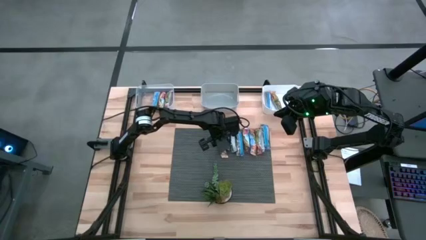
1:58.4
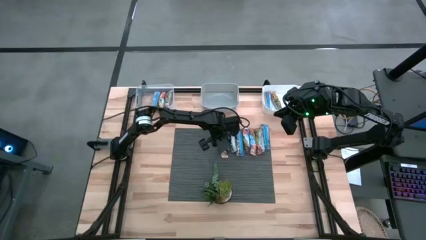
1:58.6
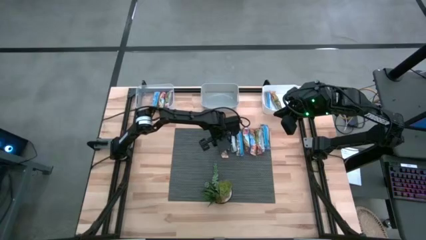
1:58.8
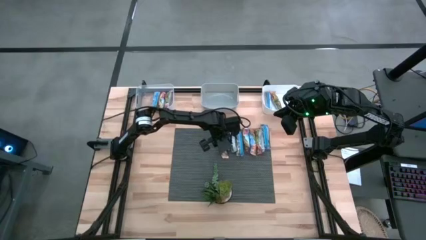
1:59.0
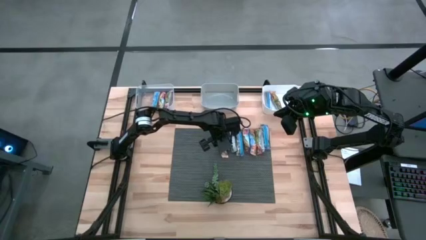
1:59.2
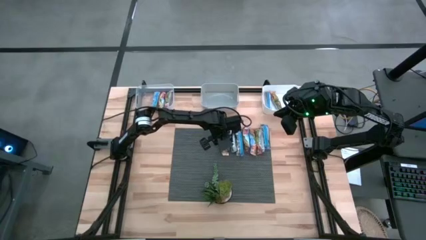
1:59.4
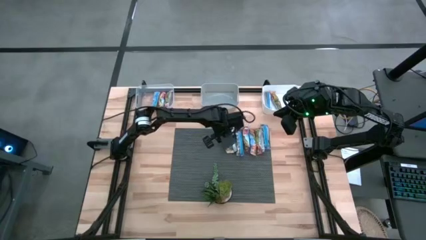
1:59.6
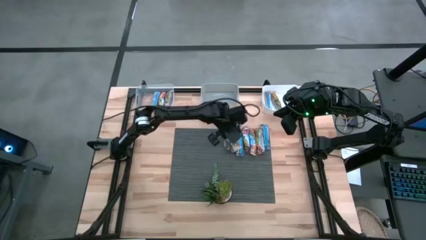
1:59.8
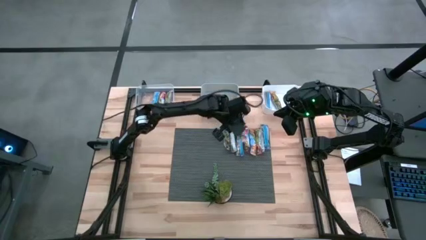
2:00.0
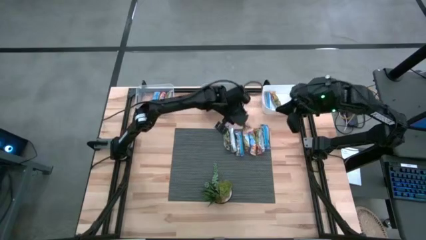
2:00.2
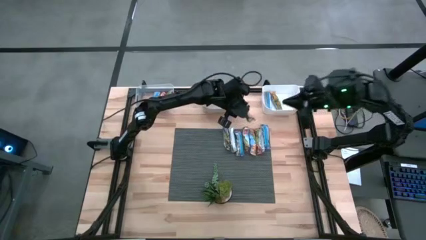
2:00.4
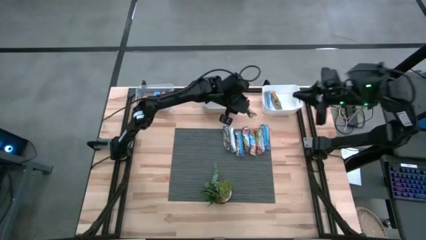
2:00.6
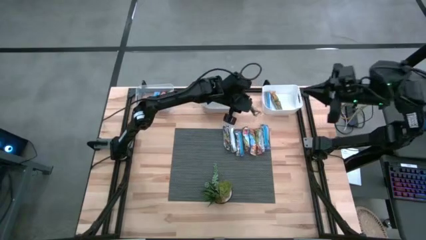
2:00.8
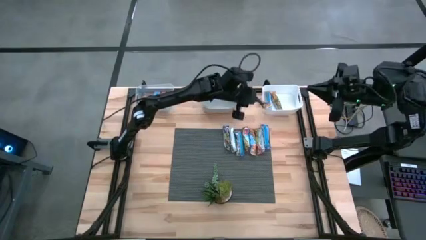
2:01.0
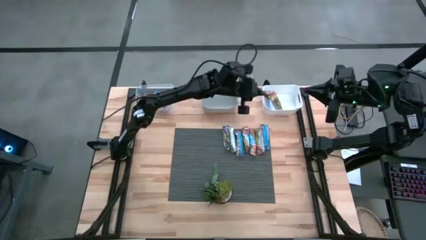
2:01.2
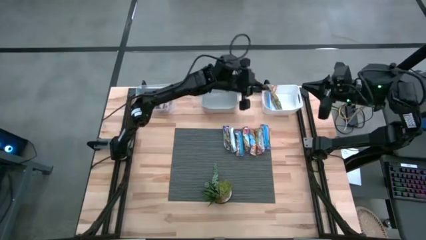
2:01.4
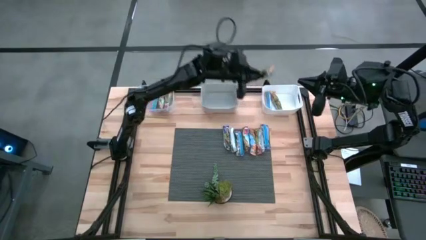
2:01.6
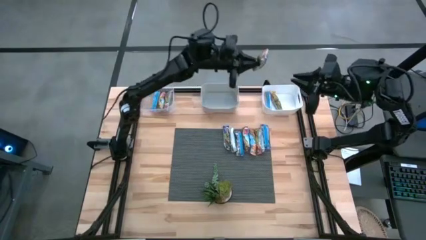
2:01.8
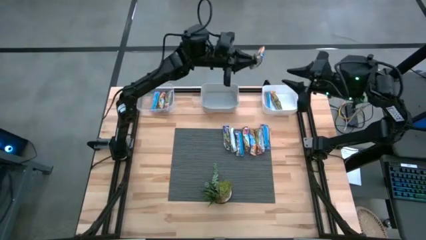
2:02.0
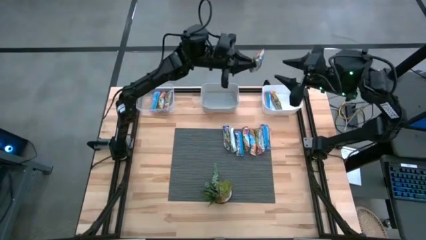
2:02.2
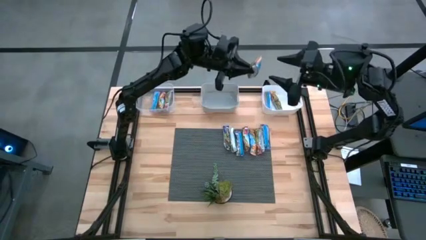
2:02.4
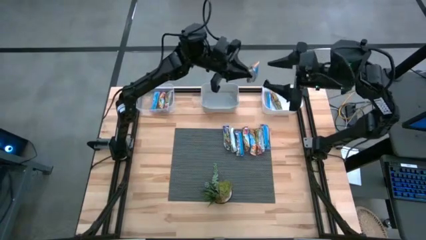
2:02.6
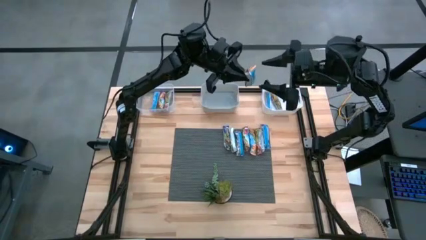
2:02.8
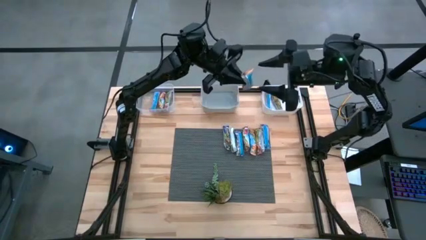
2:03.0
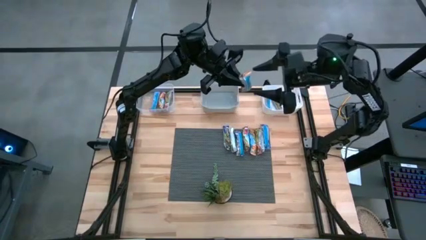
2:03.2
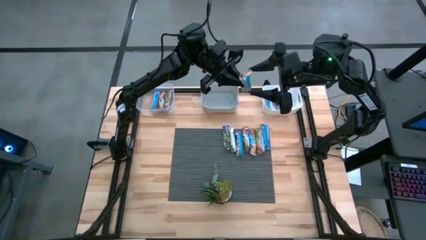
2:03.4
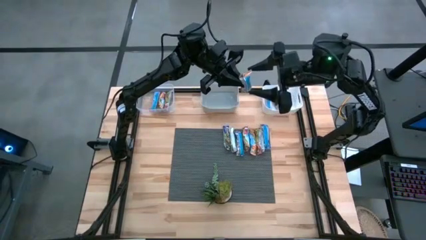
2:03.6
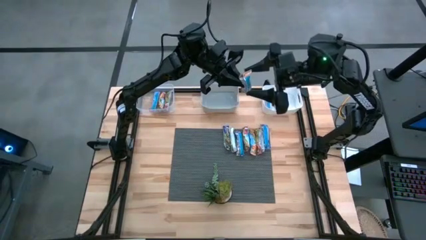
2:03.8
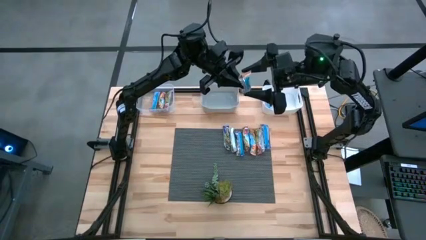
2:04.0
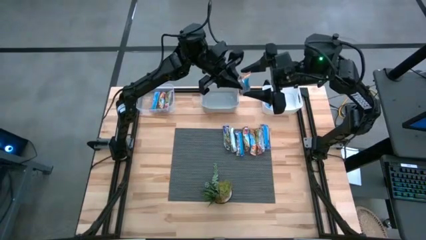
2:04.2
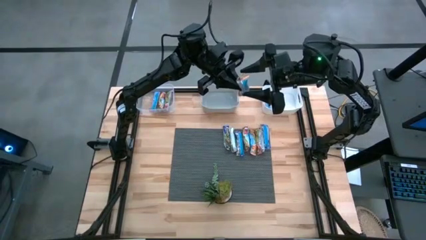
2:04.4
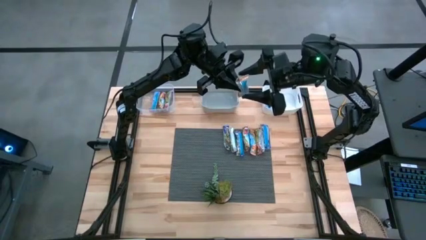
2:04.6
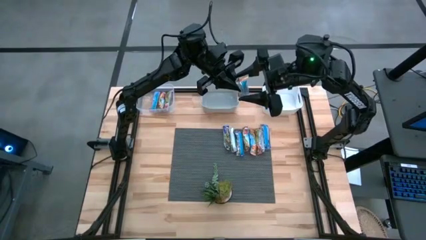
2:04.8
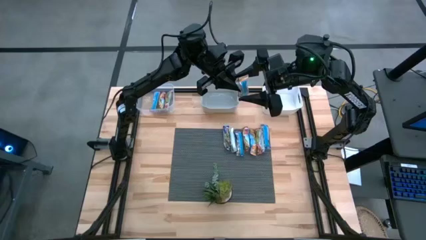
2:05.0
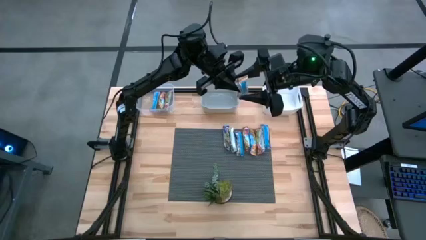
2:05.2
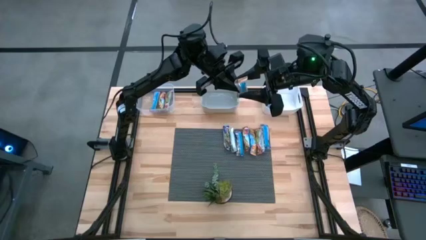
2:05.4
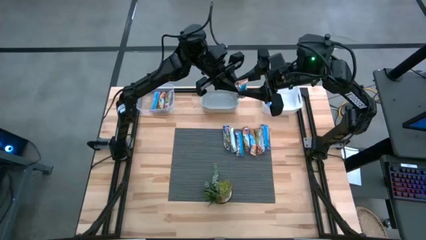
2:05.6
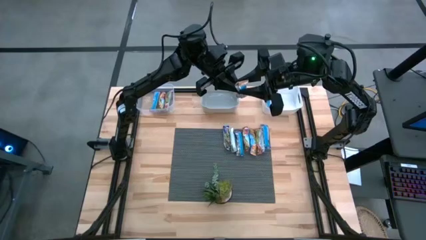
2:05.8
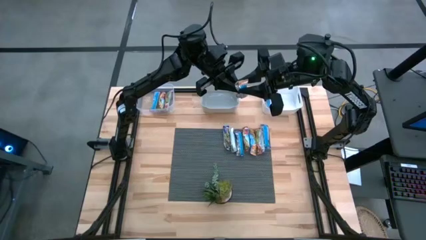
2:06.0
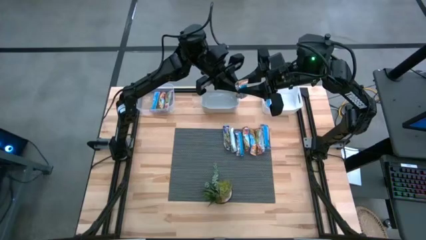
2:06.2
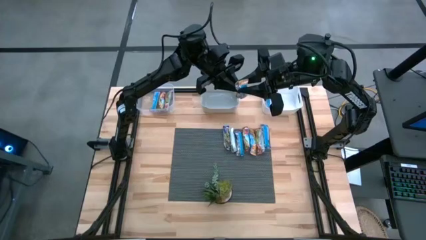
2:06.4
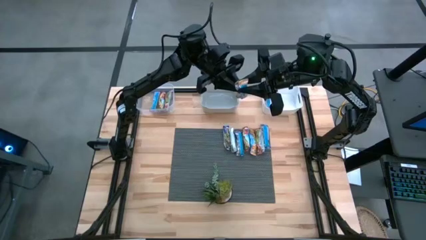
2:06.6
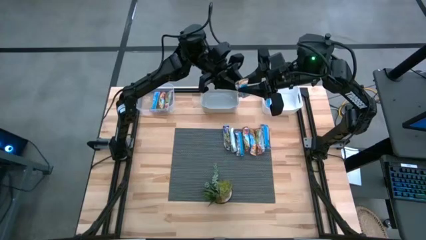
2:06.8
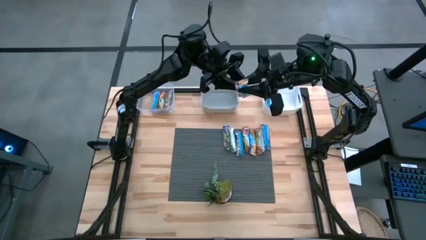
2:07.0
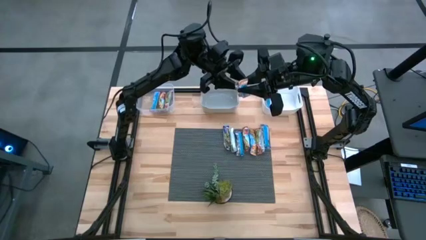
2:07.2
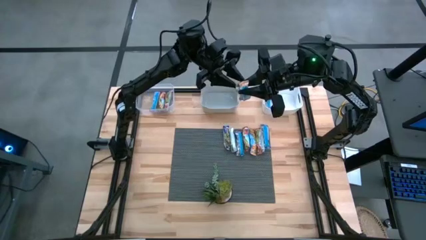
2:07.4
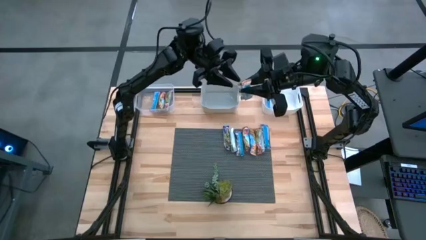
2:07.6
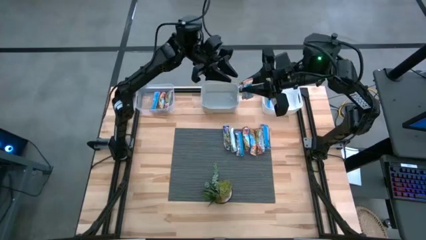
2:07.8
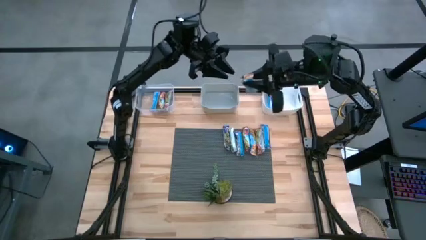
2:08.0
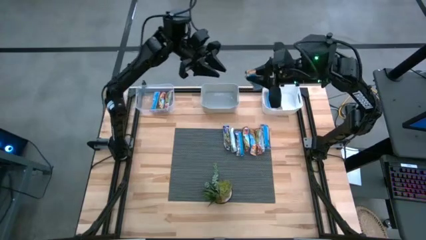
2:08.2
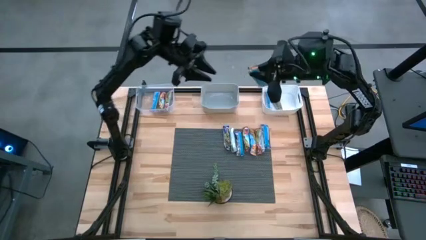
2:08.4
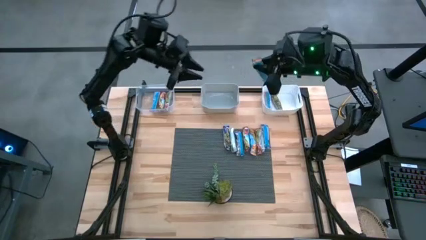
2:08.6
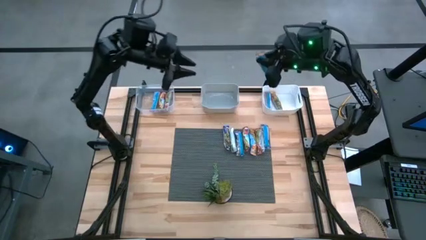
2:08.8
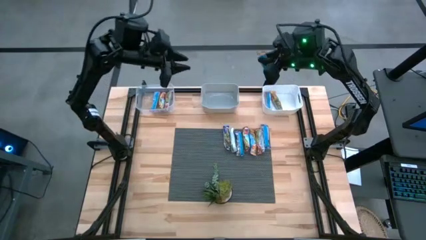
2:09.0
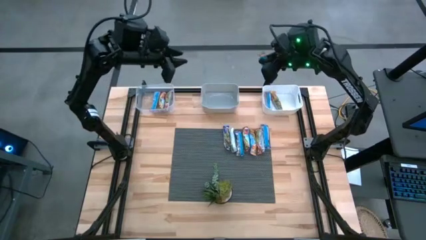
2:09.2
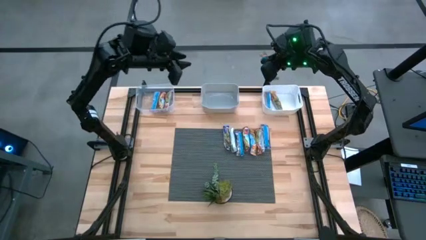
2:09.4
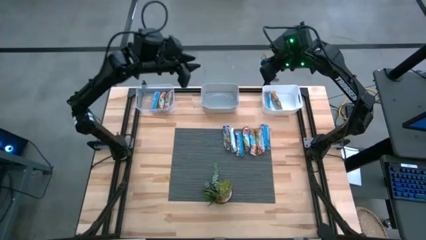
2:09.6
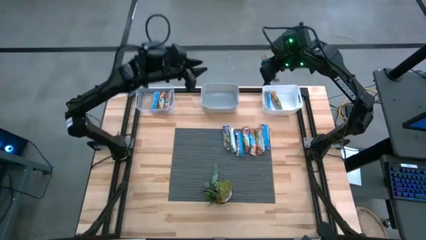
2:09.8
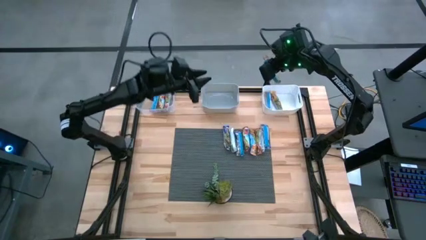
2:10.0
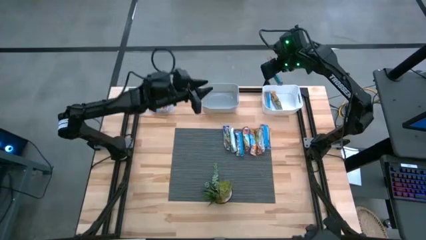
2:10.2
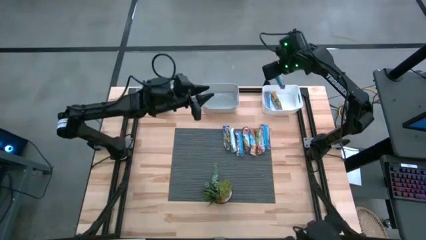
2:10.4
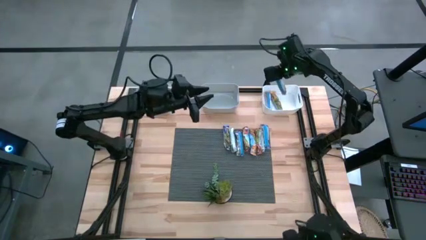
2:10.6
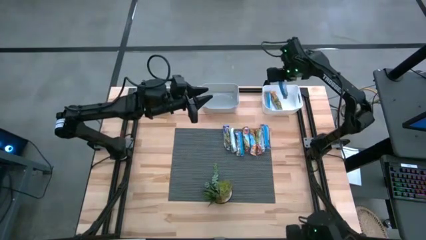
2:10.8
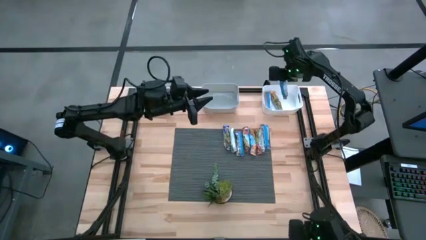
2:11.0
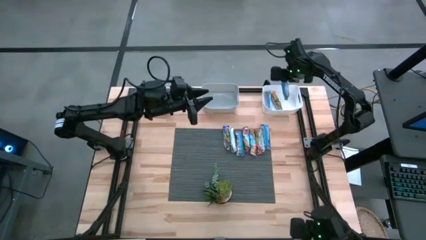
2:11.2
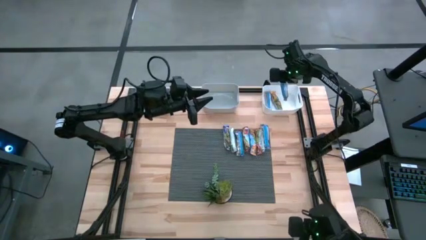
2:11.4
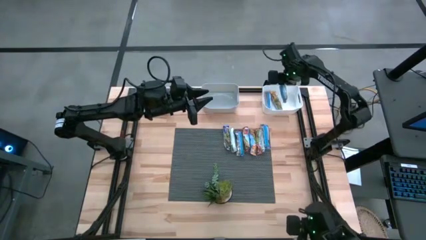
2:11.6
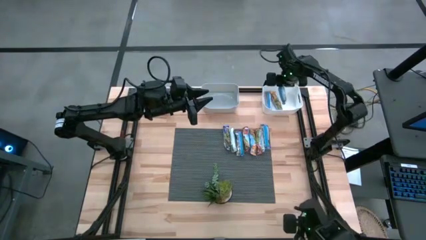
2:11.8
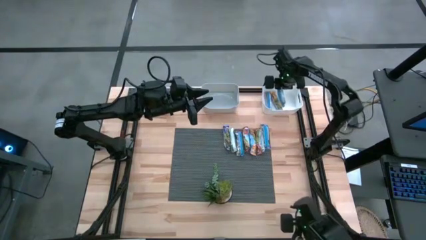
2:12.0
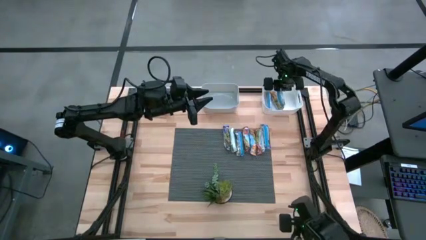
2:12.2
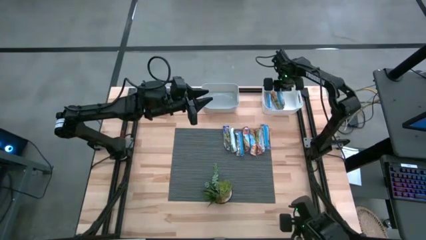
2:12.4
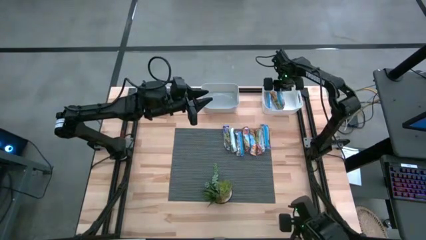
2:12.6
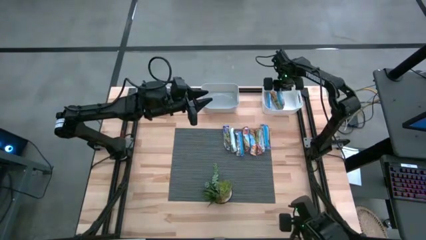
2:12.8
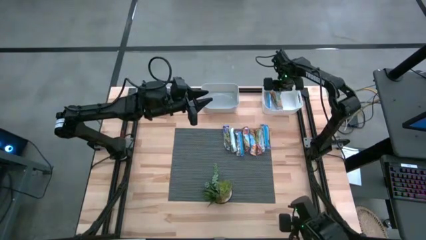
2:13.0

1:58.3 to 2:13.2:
Task: Pick and place Granola Bars by type
Put the yellow granola bar into the white bin

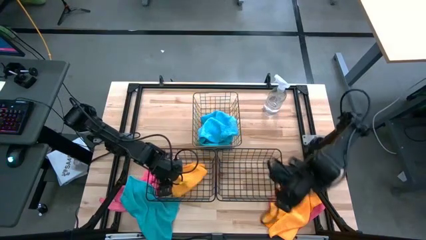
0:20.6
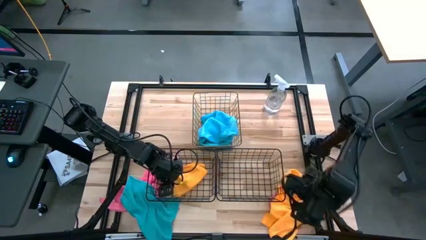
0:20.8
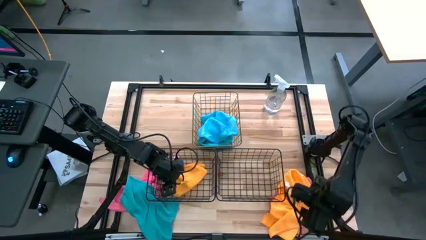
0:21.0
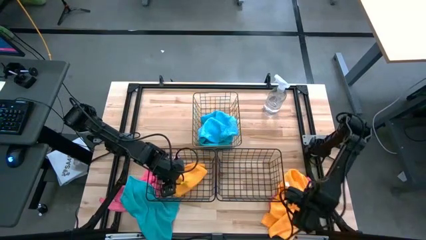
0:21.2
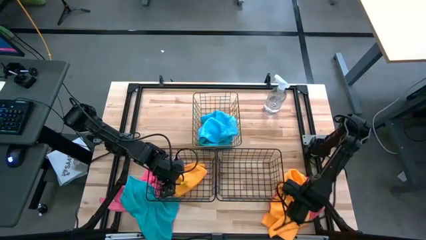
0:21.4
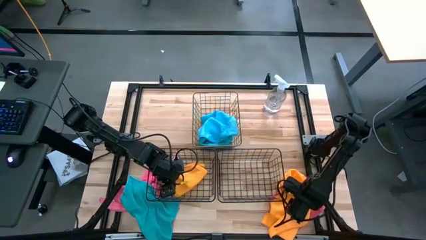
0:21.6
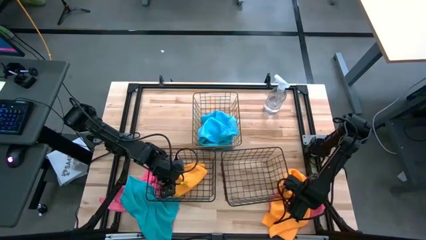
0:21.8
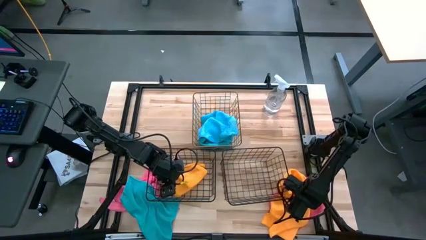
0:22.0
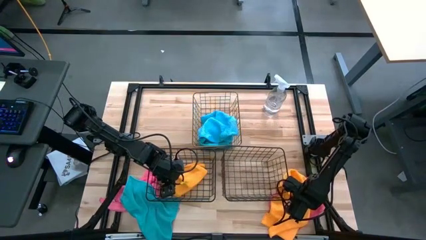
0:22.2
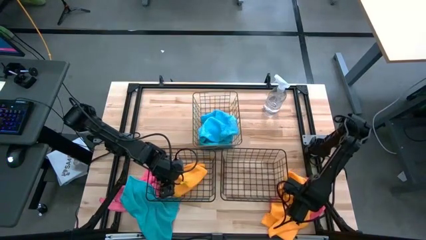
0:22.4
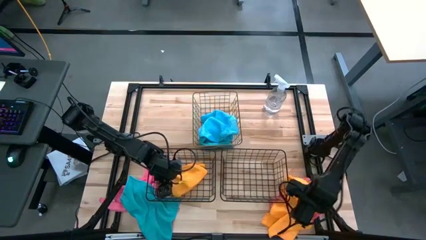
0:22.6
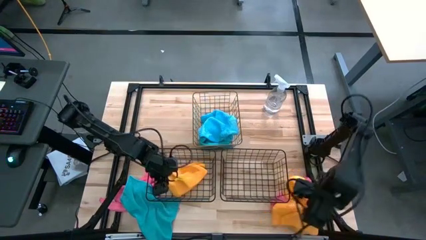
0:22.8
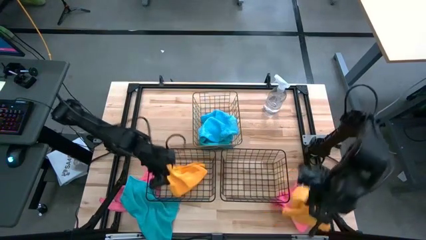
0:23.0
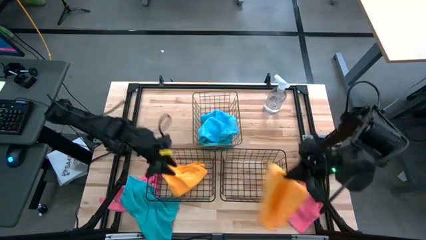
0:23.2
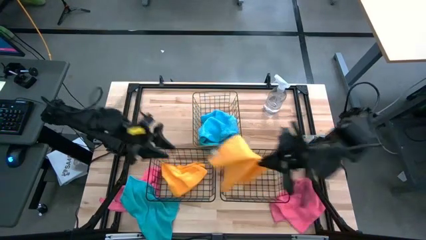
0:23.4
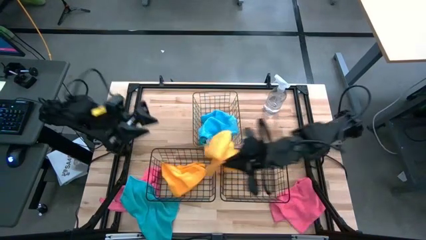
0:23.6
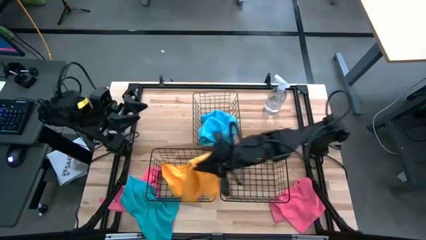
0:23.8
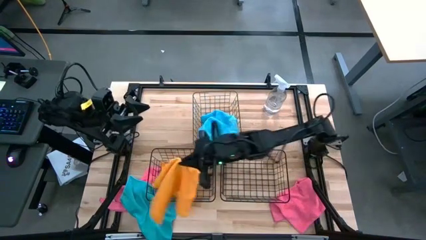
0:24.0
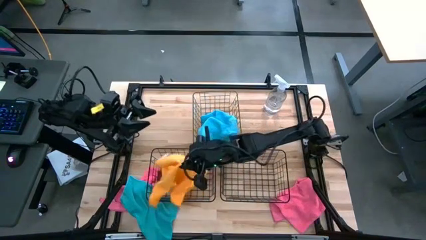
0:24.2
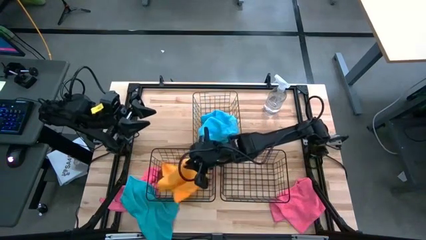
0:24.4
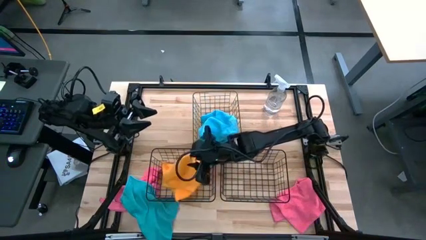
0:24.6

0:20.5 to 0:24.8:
Task: Sort microfiber towel by color & place in baskets
Put the yellow towel into the bottom left basket
